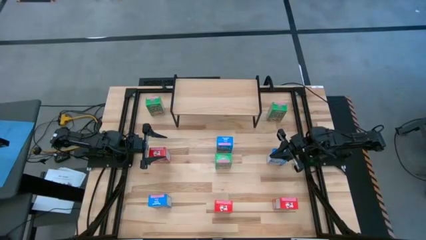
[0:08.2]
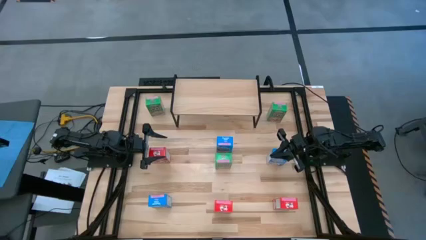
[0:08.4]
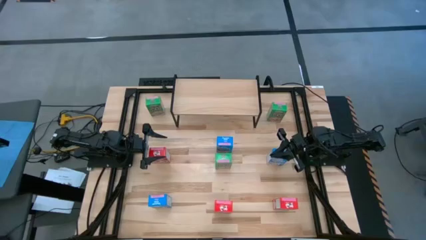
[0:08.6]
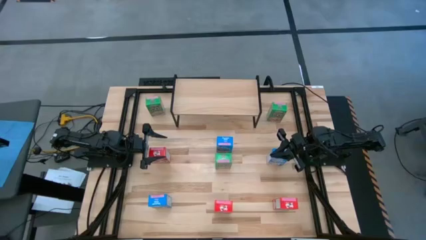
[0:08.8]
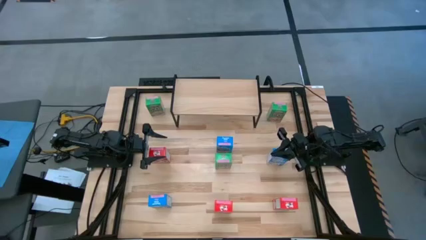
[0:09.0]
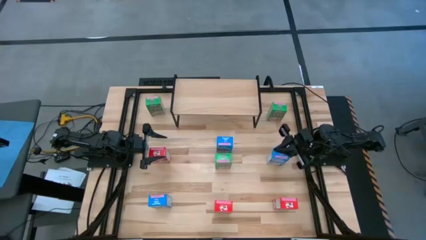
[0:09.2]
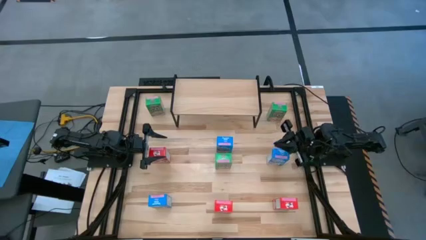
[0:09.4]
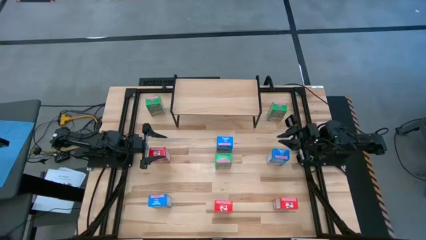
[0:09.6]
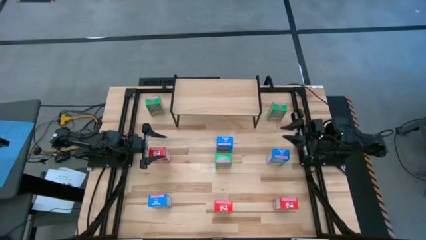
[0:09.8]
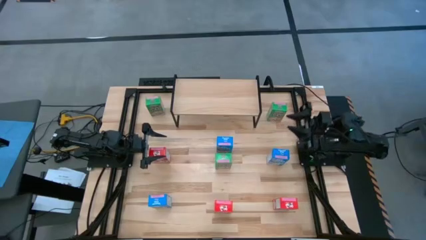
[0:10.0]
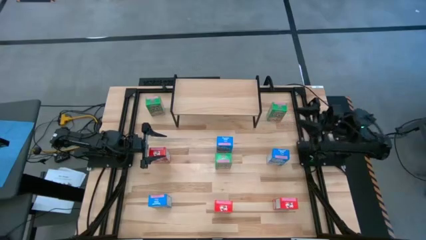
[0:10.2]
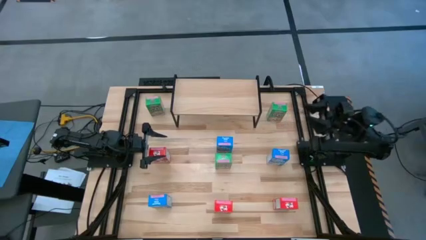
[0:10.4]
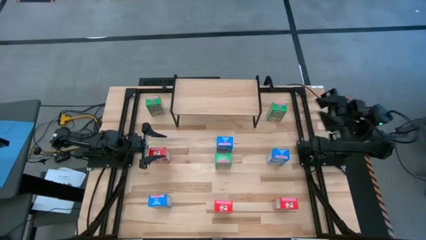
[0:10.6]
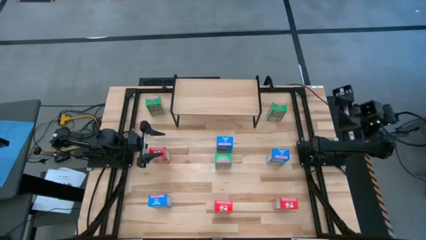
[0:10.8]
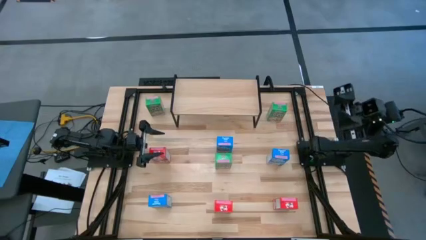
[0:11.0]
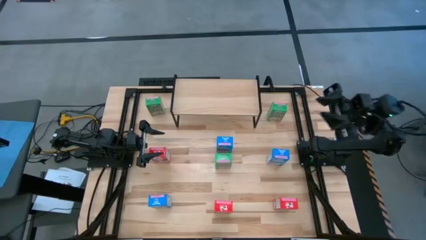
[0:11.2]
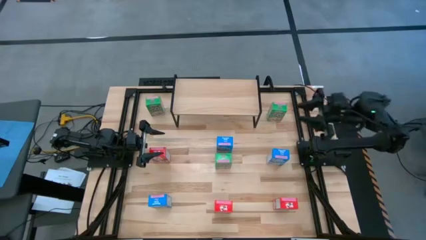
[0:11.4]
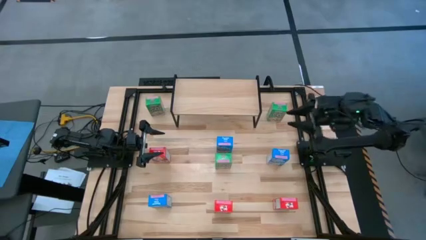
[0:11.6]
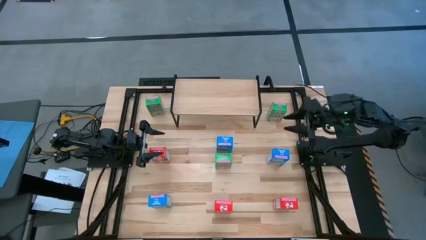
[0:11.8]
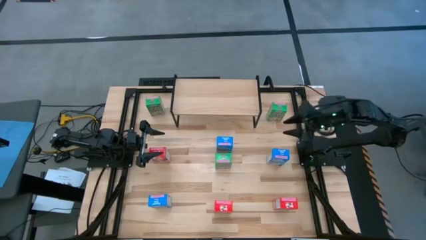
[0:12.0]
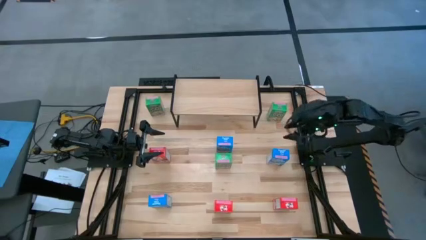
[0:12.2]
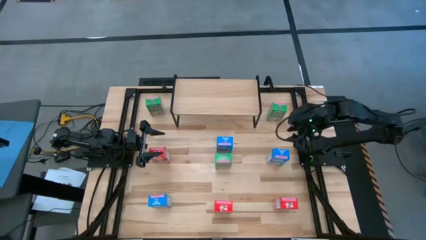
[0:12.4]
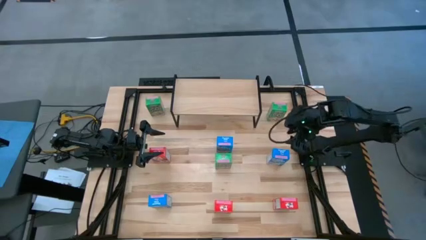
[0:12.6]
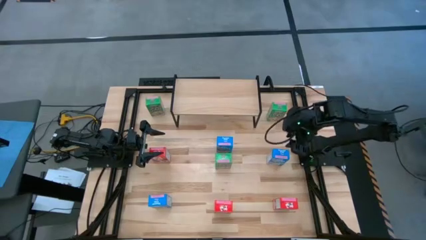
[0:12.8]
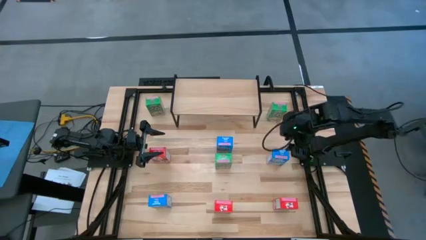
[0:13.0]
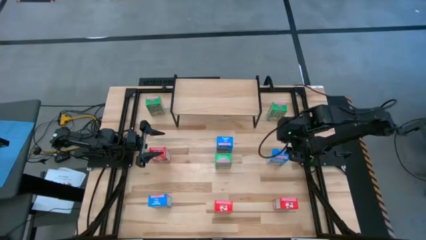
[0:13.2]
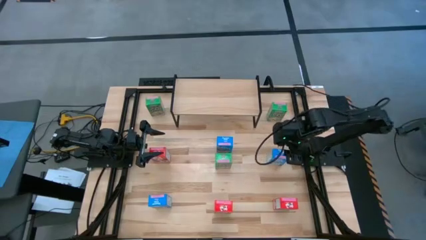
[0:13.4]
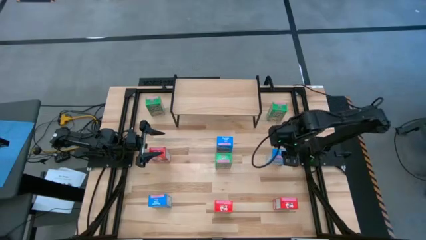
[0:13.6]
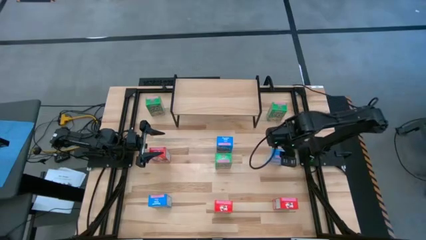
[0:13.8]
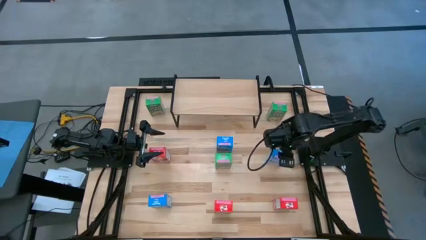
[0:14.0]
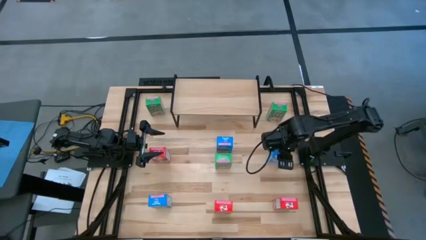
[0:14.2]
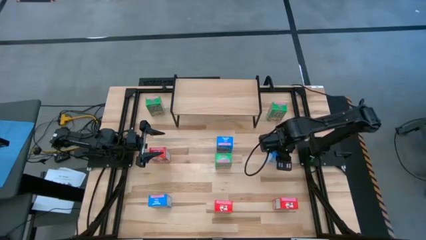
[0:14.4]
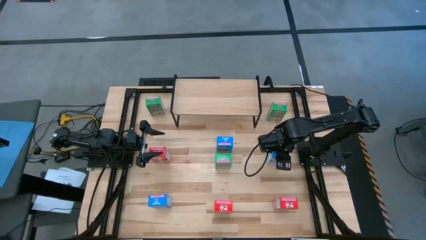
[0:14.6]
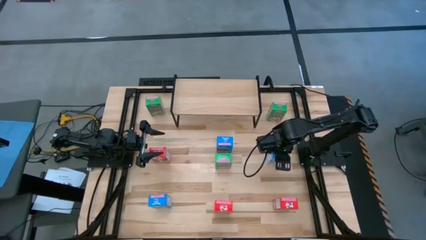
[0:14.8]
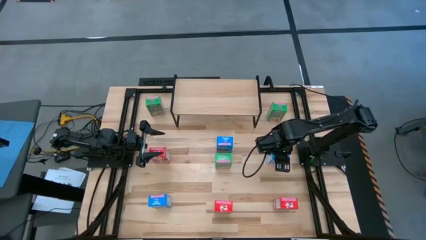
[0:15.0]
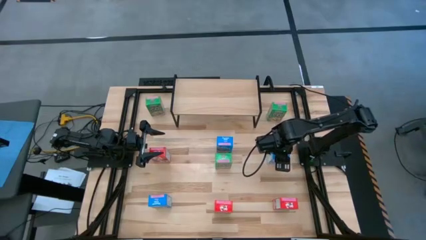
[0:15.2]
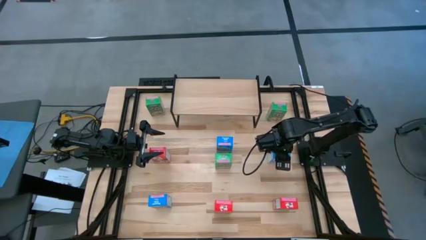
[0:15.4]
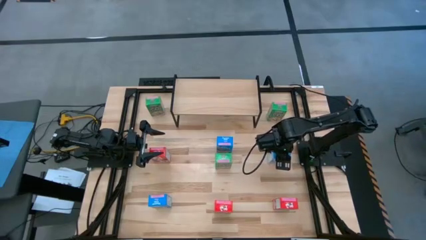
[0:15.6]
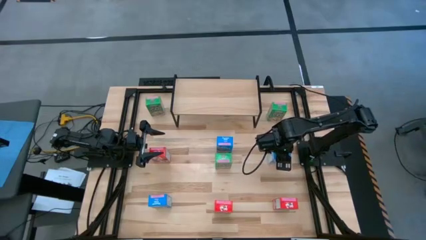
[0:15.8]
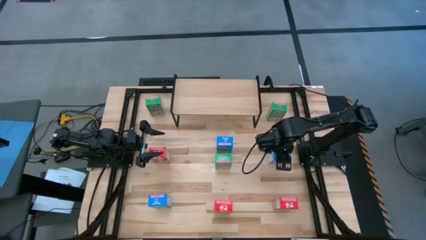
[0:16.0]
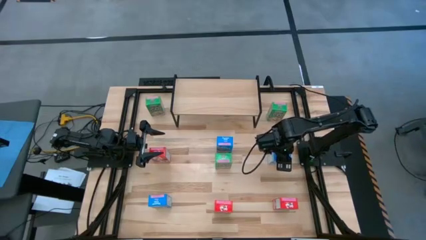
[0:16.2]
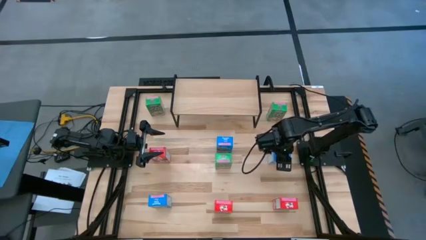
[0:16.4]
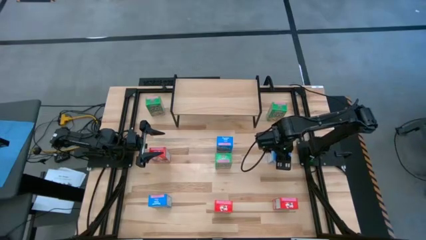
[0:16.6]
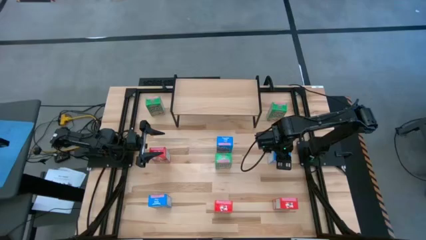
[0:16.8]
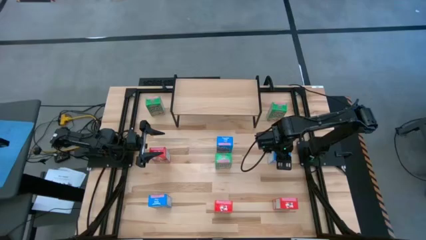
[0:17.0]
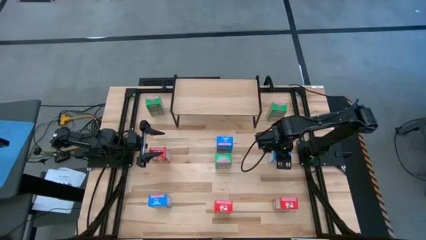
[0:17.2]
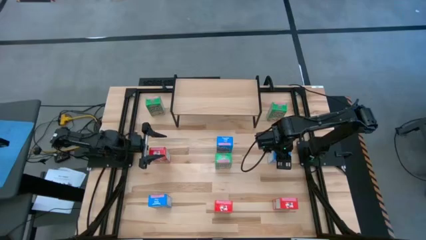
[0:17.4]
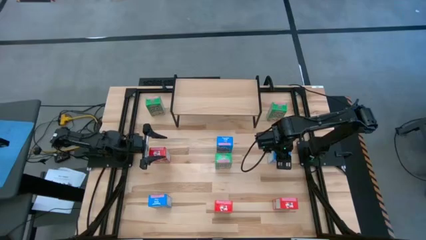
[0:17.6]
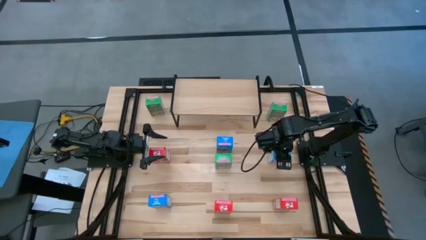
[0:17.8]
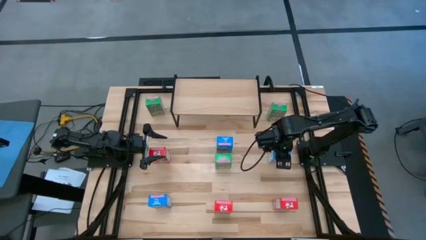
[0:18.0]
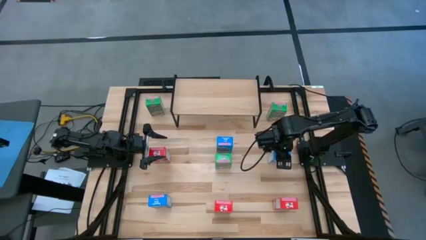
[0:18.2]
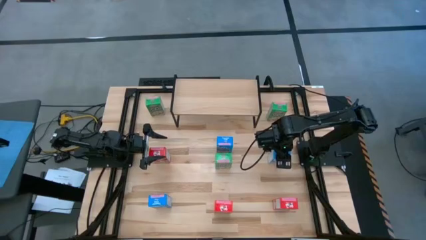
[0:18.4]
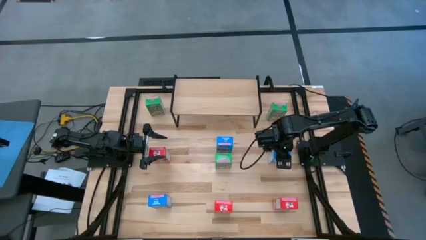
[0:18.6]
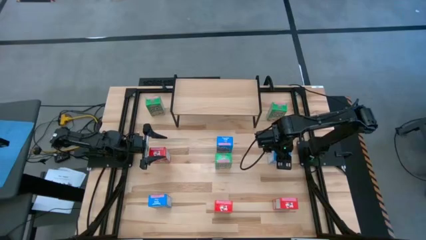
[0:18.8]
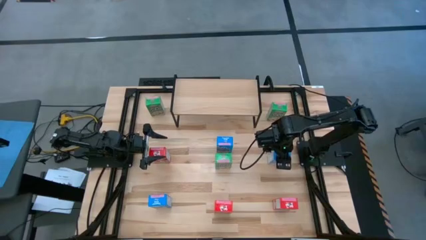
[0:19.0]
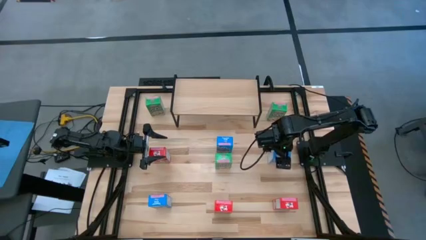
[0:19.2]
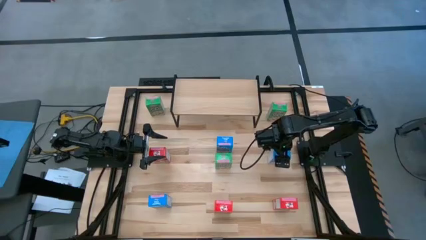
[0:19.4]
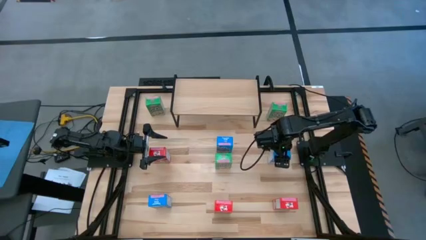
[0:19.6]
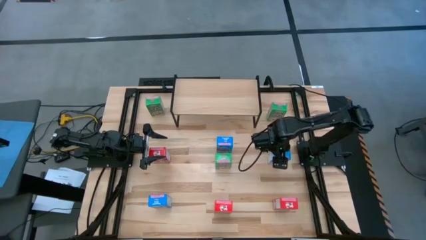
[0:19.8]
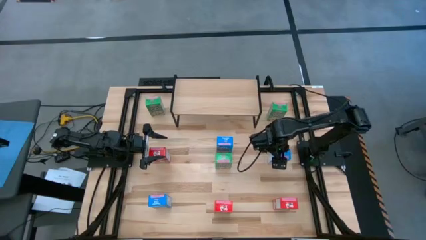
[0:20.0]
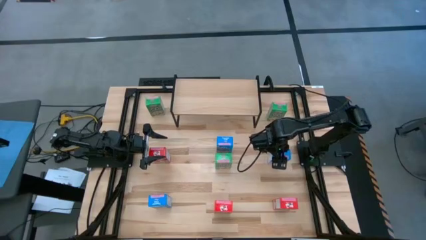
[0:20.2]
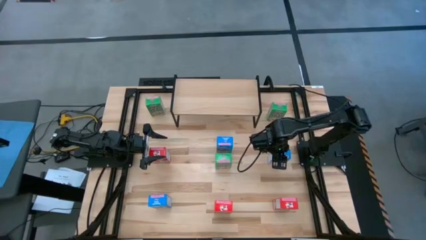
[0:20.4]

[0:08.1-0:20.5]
Task: Stack cereal on shelf
Put the top right blue cereal box on the shelf

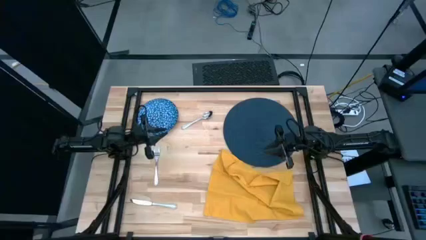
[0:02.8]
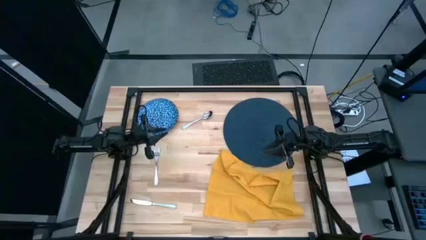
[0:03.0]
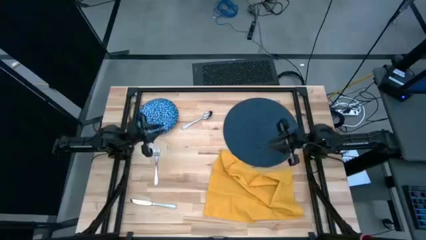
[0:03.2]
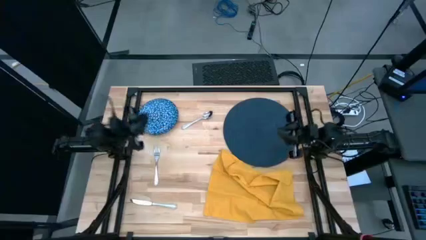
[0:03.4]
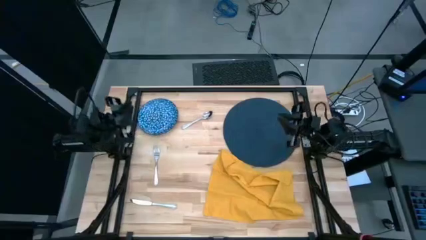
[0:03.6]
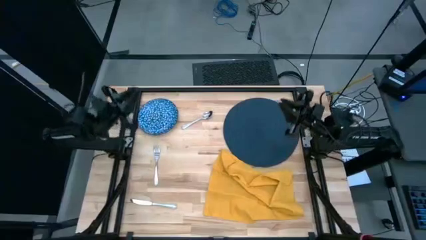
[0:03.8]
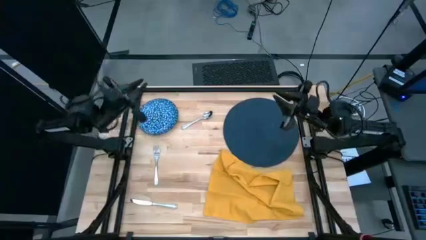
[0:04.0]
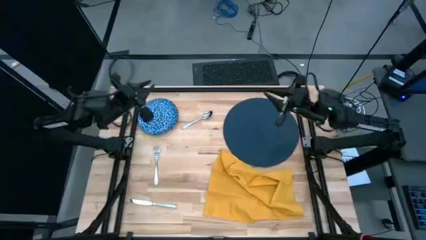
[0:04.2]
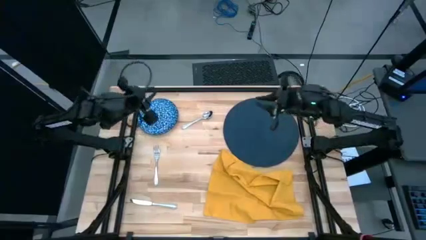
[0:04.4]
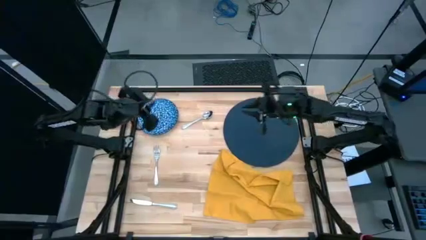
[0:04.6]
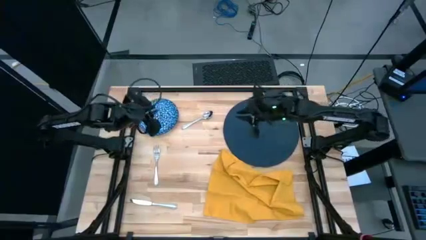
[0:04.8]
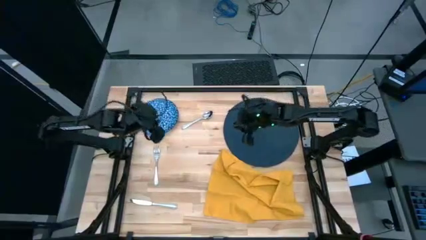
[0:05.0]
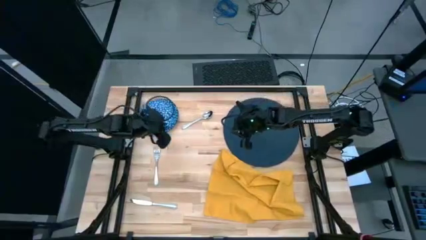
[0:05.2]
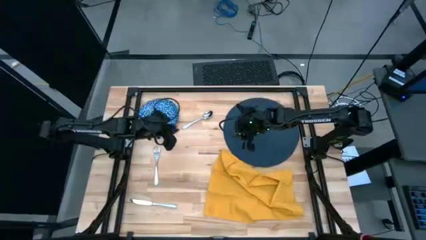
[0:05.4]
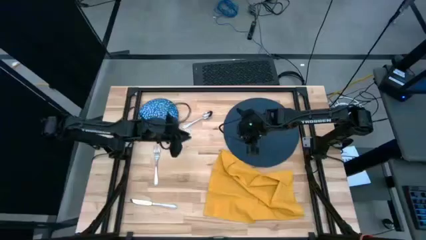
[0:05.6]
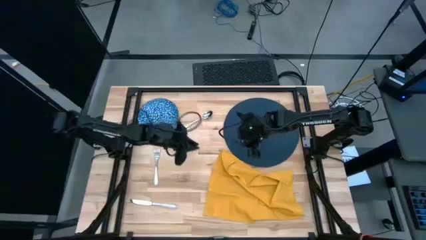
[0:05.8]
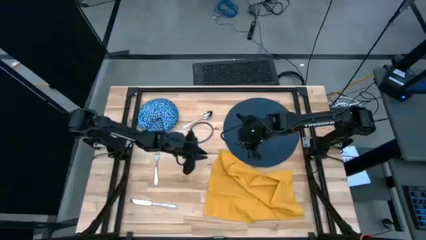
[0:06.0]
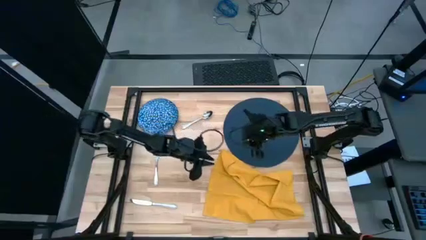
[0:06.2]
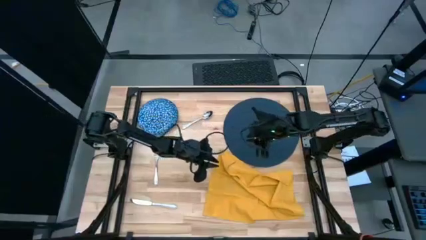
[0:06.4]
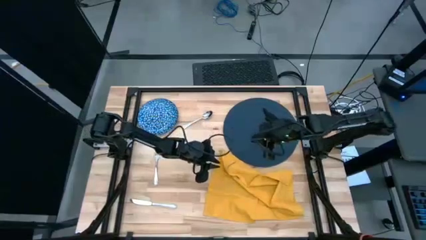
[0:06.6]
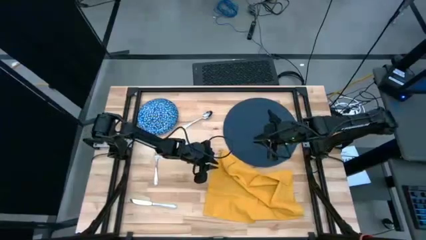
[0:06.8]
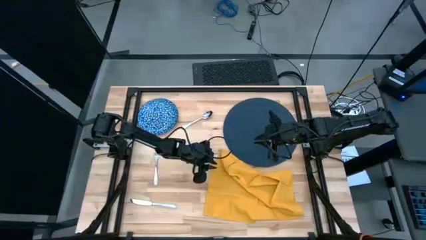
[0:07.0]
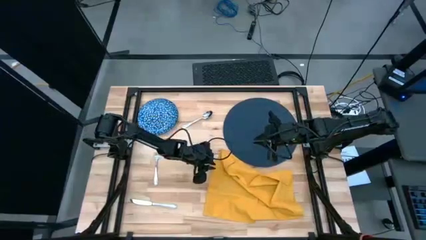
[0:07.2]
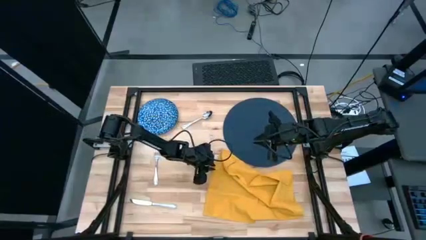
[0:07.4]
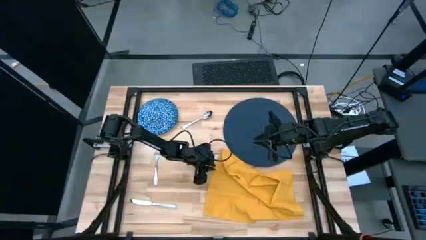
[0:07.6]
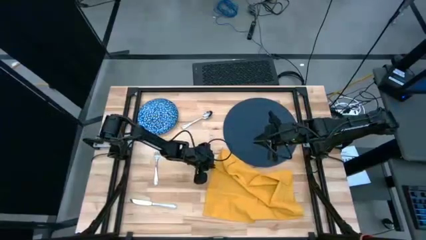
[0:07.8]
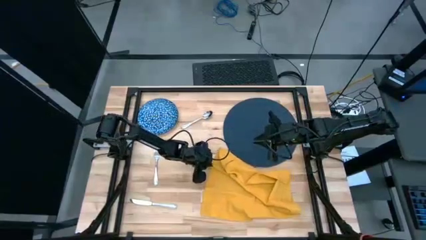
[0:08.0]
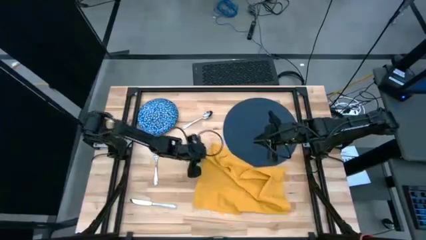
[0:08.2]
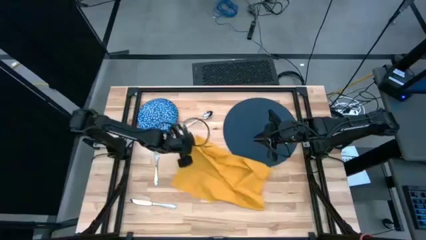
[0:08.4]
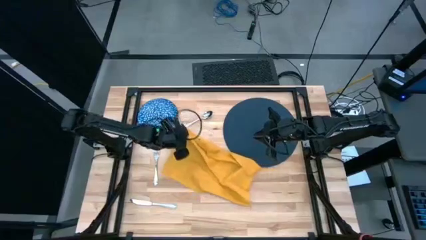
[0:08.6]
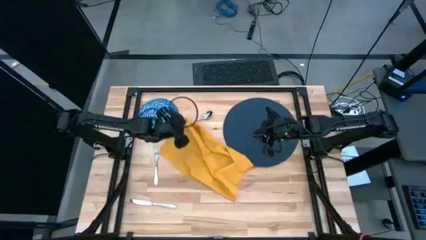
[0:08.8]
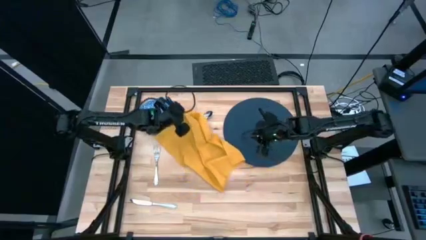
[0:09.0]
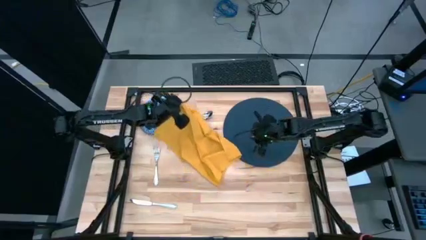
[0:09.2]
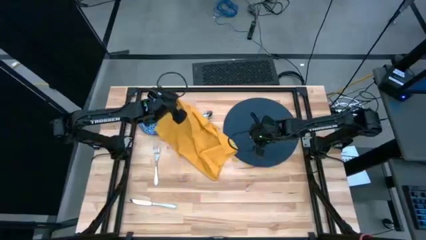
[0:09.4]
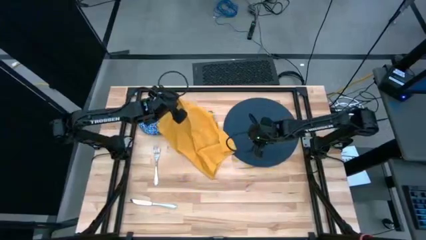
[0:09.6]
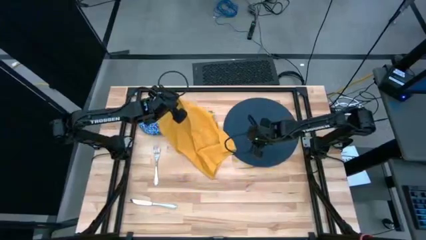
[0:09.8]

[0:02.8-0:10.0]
Task: Set table place
Move the yellow table napkin to the top left of the table
